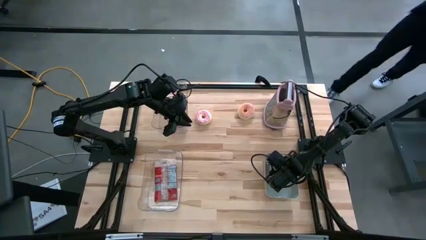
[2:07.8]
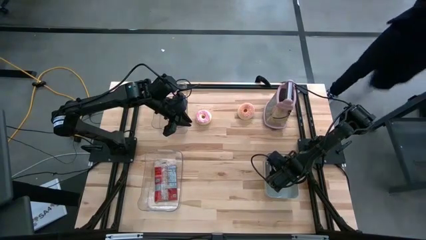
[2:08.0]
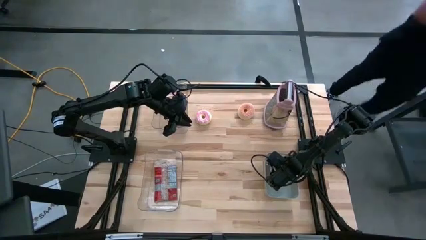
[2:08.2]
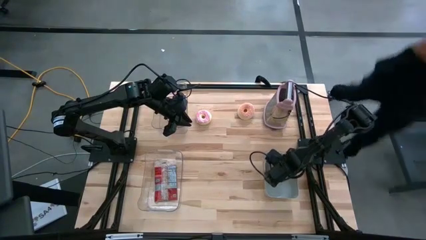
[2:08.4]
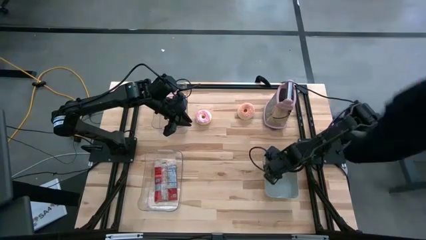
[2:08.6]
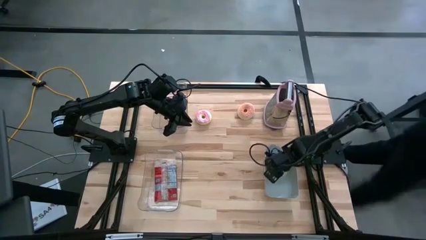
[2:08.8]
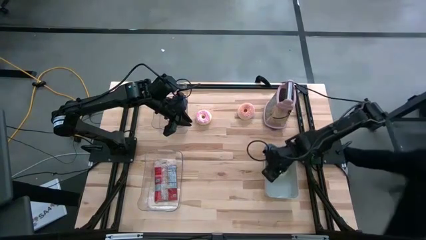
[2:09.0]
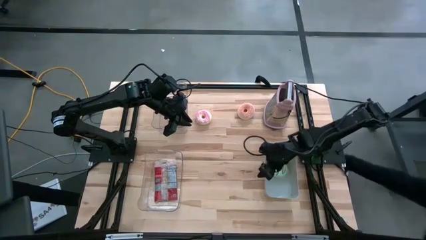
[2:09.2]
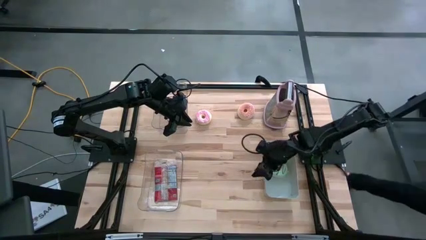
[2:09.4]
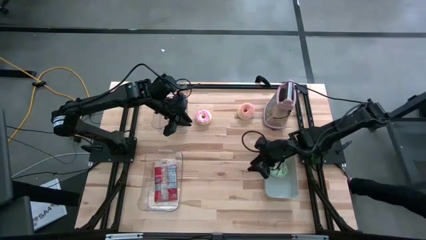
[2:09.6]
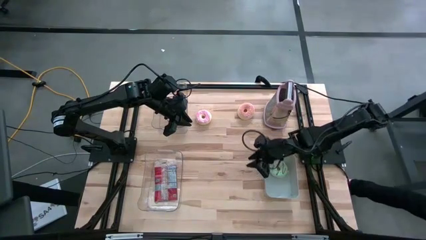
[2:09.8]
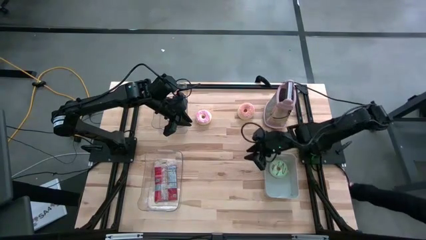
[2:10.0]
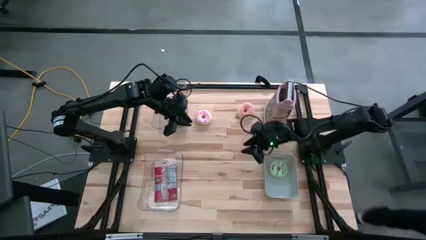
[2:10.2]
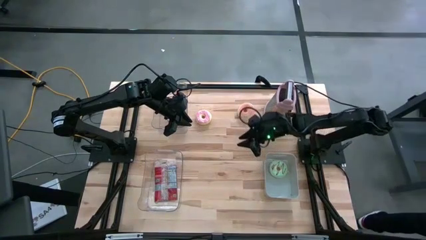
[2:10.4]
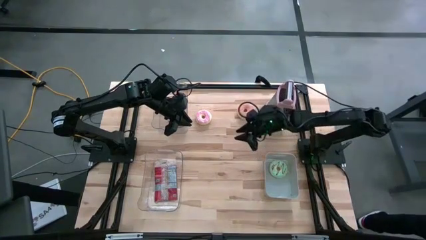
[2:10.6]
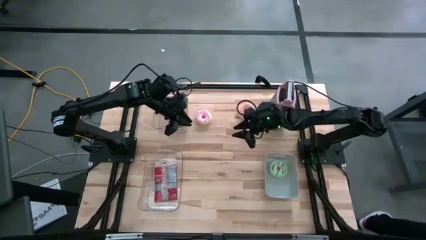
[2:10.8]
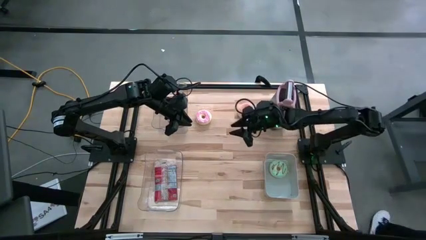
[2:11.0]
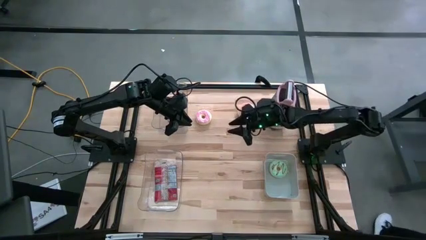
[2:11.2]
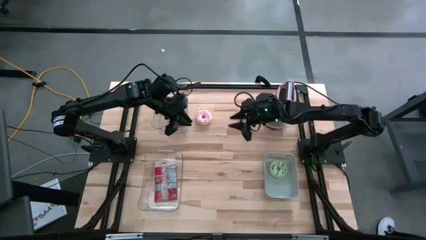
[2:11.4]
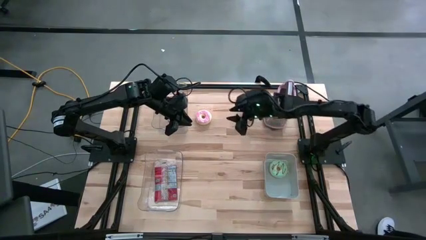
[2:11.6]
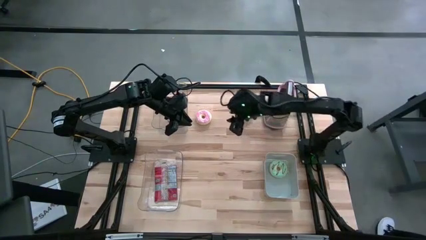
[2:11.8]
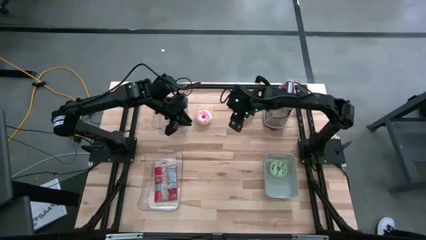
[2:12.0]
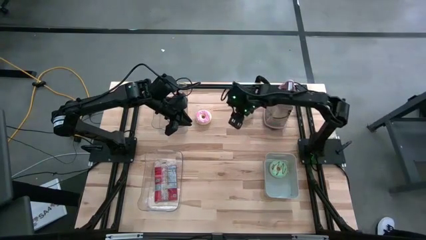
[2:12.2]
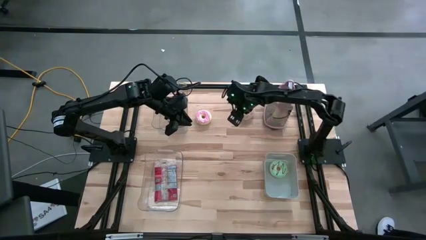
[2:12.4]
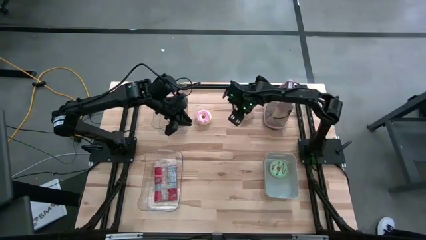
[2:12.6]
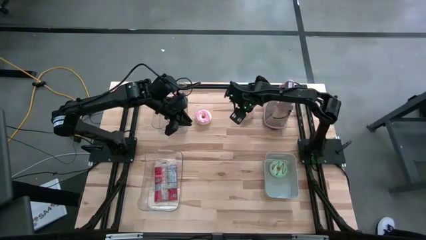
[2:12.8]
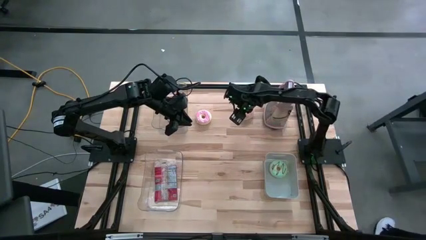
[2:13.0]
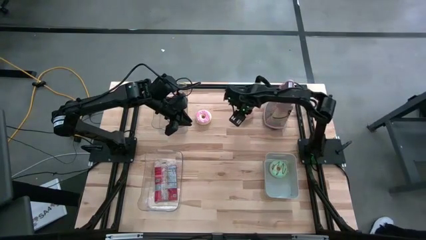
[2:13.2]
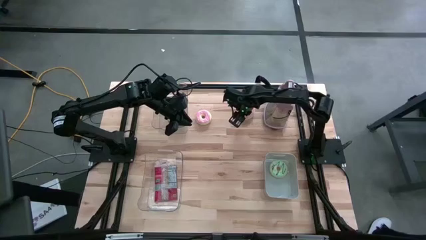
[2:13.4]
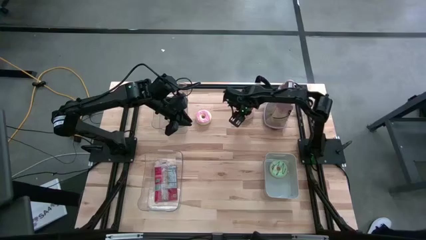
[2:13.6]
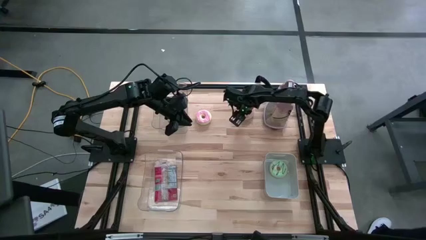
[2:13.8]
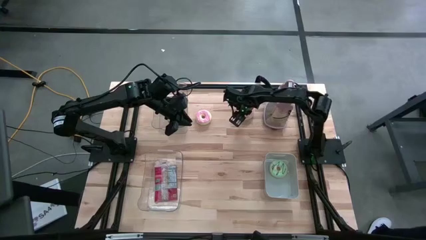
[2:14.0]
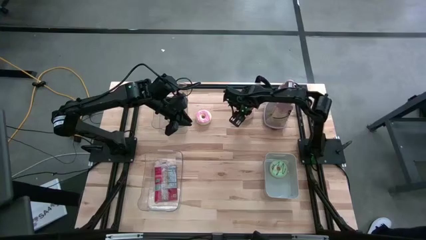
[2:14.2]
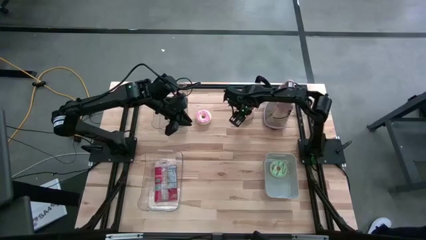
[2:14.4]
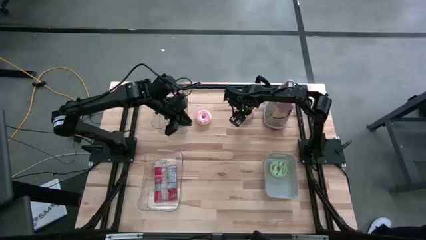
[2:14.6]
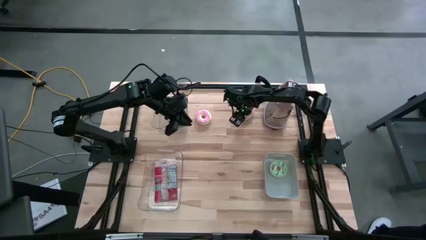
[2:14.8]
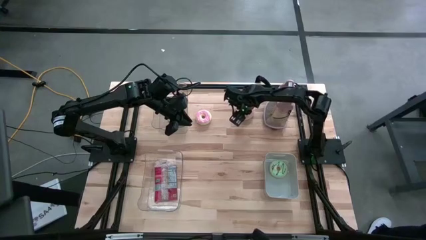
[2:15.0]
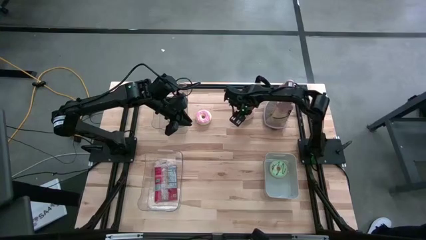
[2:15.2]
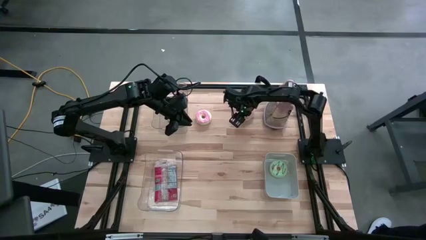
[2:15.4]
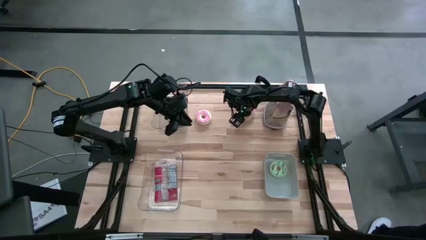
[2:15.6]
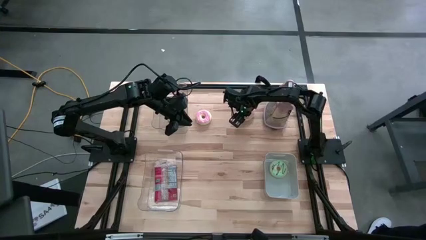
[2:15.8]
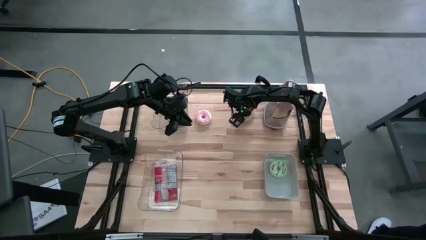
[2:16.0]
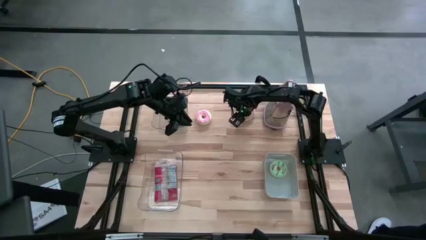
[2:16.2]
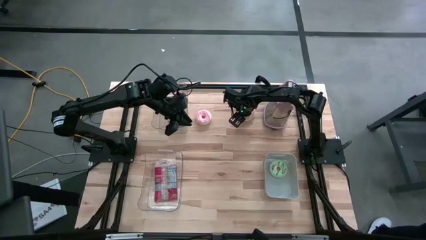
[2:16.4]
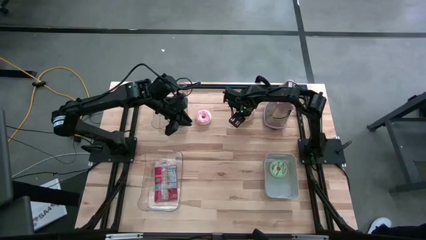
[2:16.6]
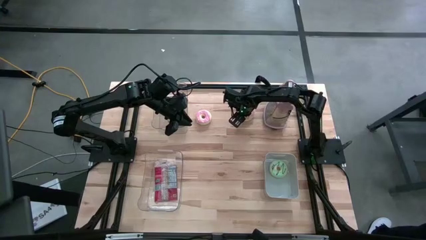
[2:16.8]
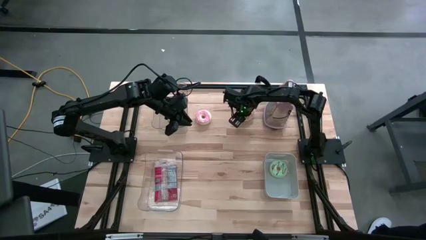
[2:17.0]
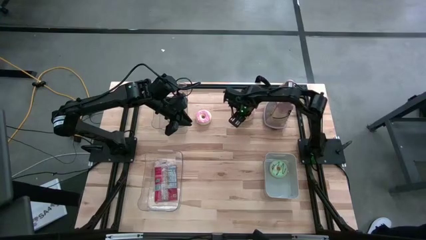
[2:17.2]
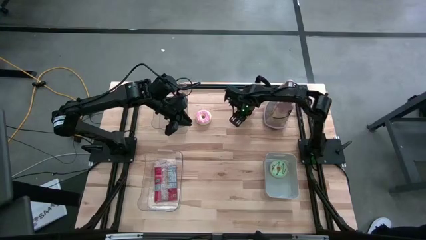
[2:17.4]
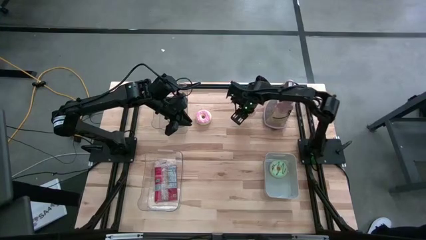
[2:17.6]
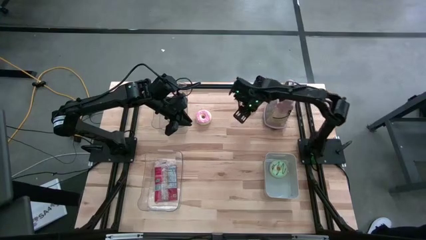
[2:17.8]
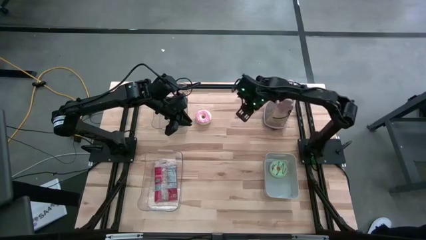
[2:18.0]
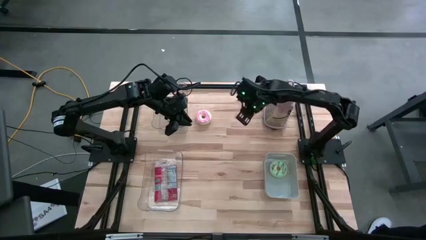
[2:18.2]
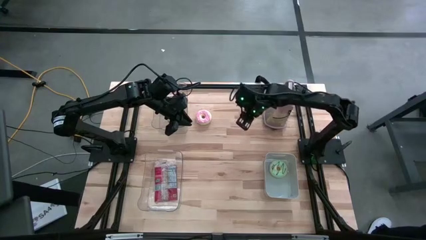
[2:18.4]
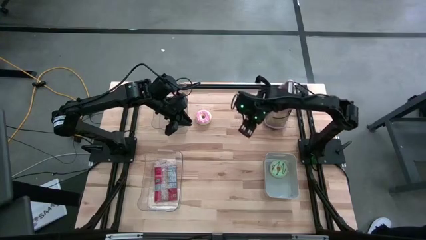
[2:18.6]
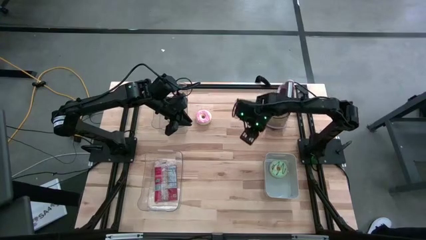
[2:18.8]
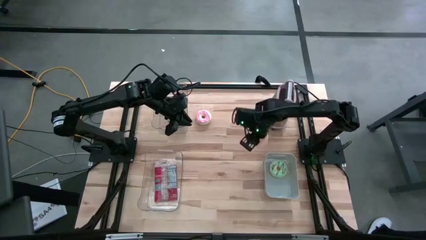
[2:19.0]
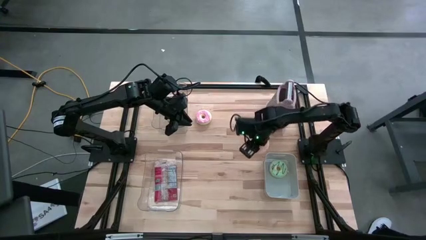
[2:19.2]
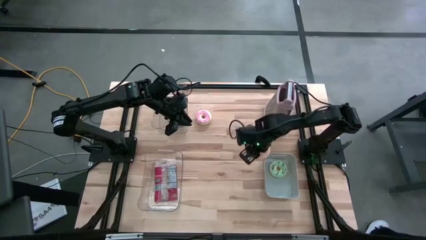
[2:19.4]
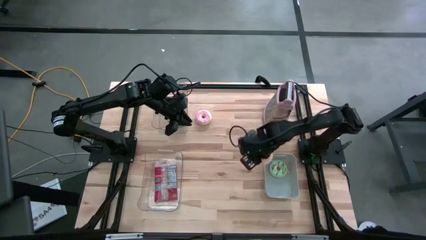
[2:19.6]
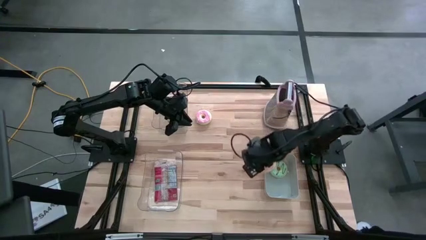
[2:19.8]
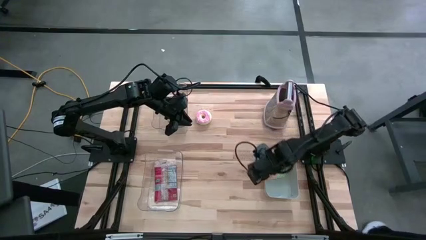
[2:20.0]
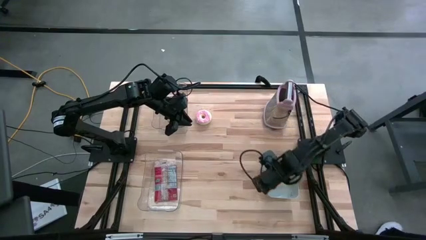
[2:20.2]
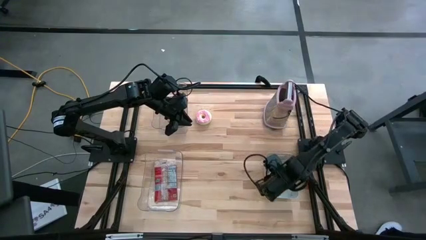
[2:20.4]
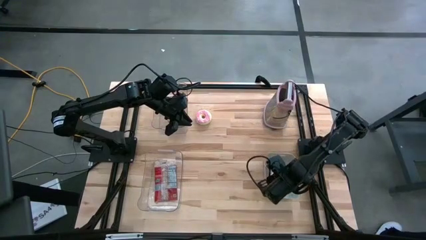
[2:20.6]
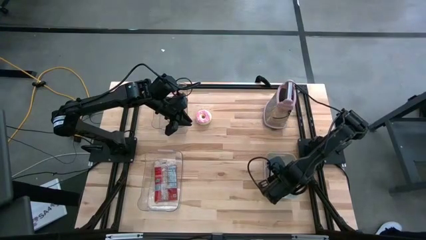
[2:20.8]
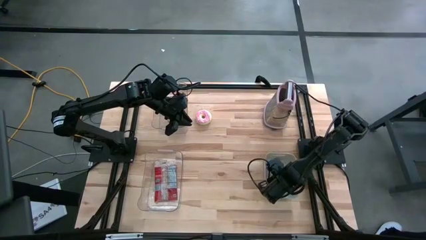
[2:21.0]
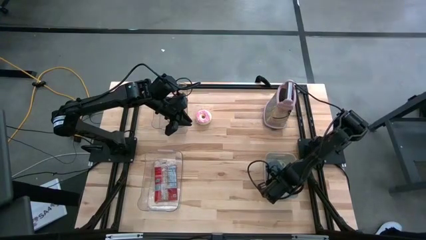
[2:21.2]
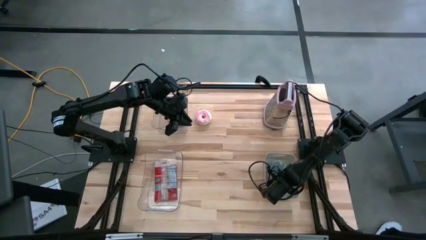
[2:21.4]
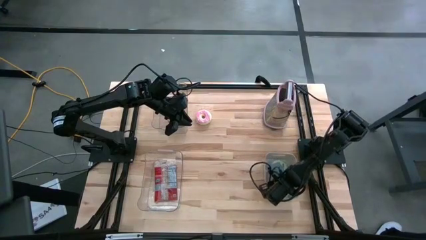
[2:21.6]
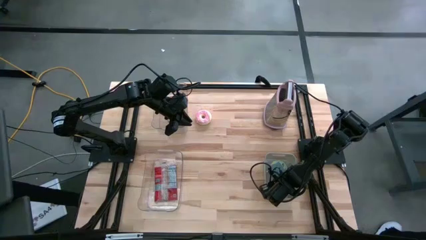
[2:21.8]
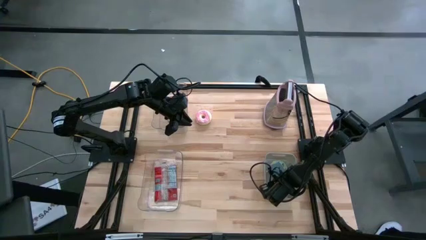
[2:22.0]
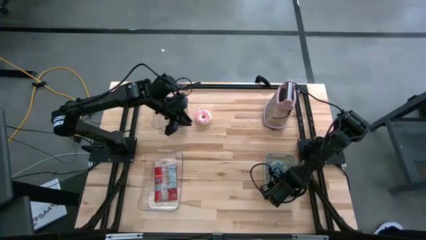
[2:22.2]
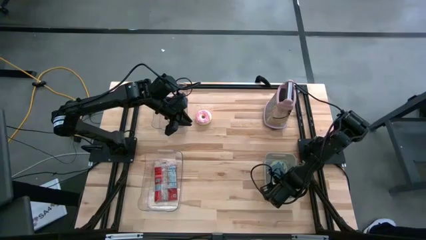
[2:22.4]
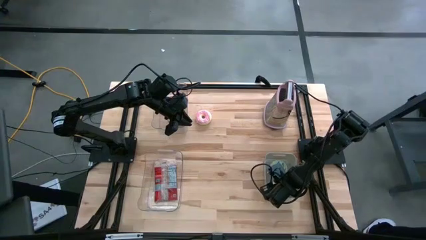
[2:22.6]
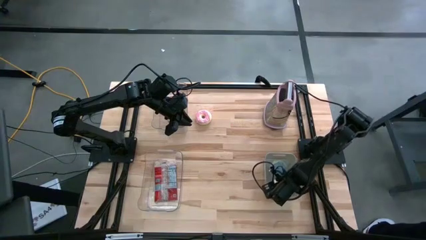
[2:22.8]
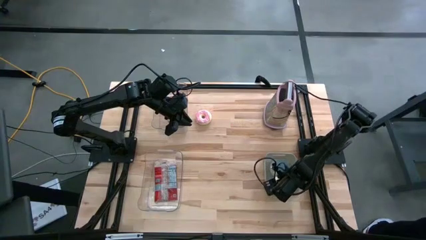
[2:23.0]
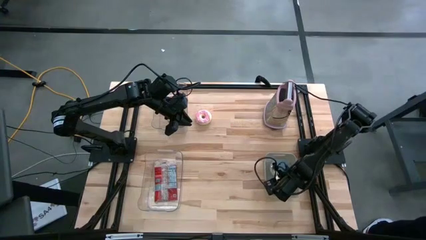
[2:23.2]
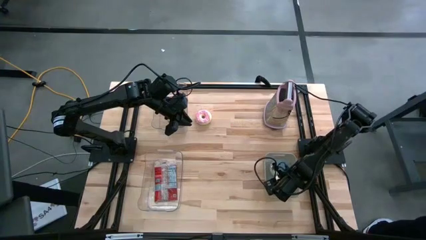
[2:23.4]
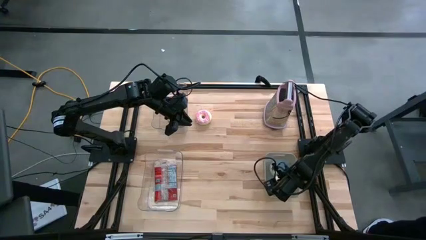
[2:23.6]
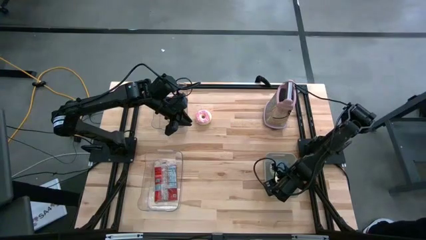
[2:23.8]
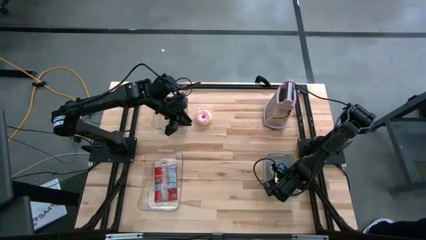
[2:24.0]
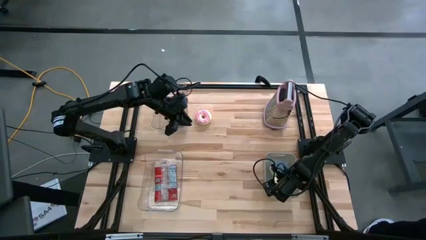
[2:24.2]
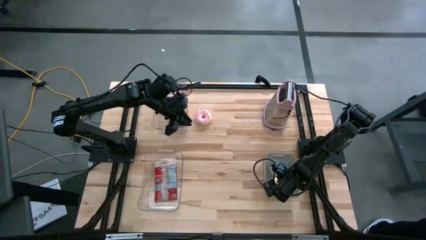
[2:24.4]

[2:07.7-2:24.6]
Put the orange donut into the gray bin
